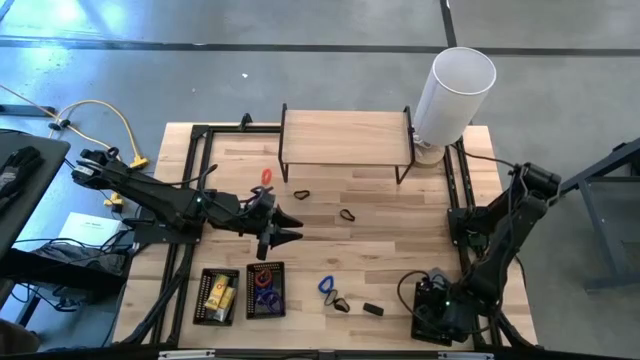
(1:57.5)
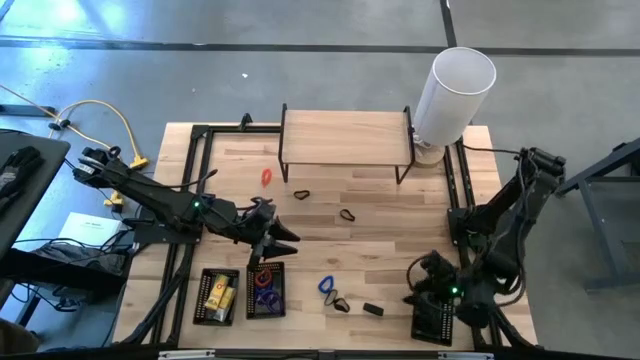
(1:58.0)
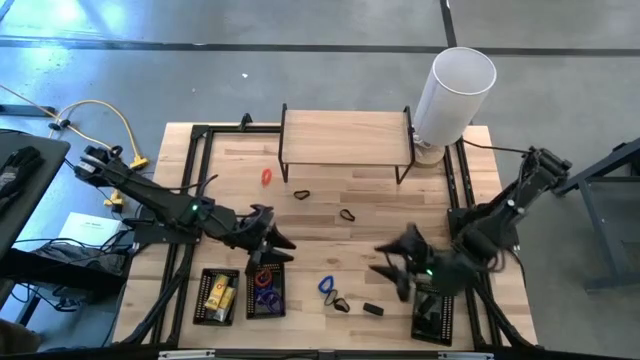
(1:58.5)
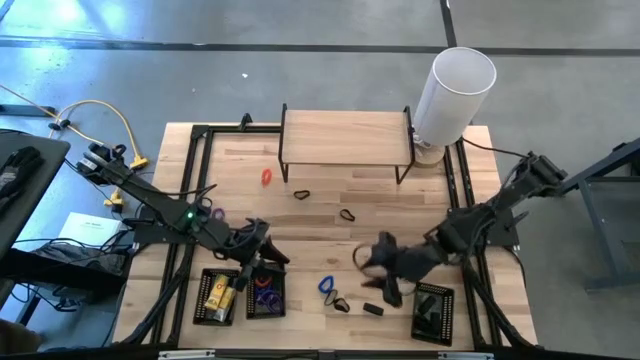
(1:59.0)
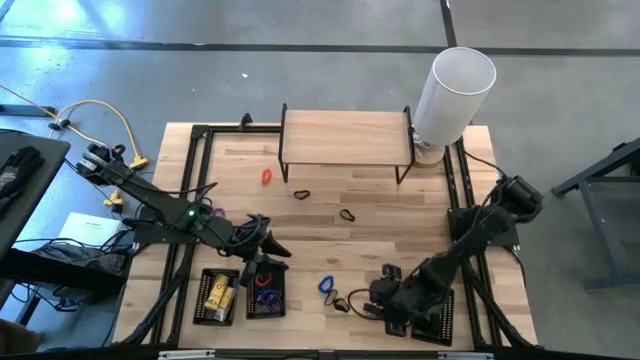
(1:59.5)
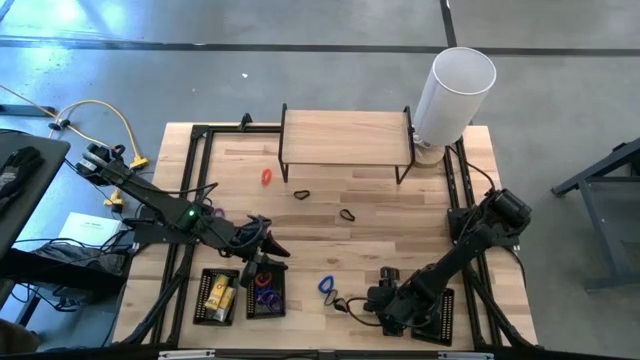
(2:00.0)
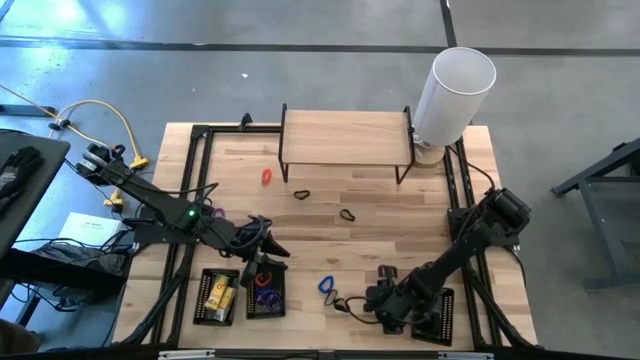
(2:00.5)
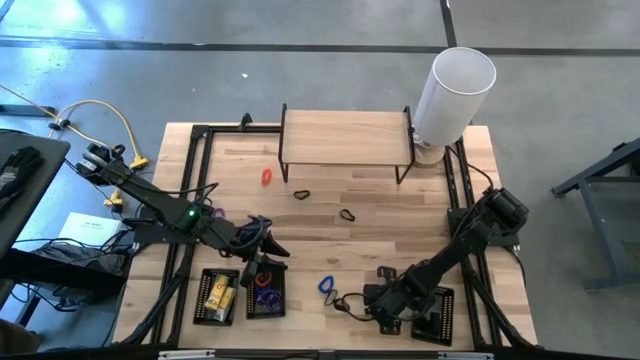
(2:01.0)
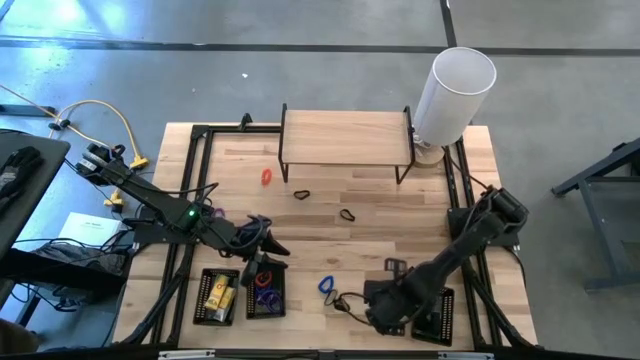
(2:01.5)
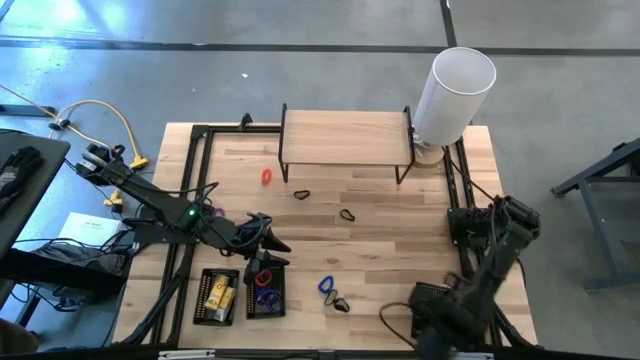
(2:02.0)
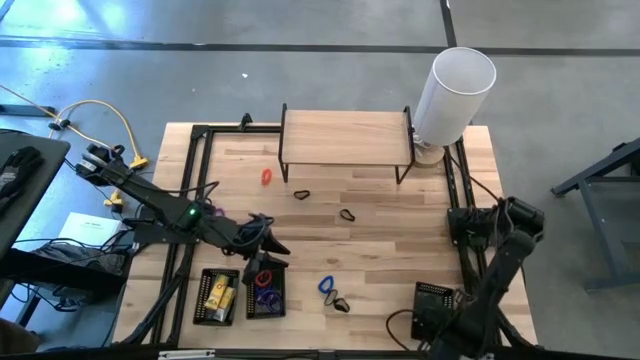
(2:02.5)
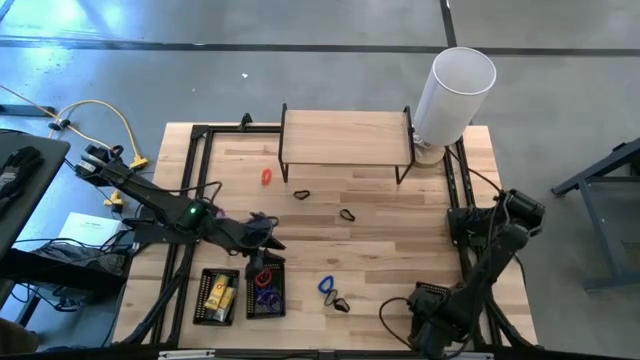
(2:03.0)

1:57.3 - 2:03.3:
Task: Pick & Place Office Desk Supplies
Put the black rubber band into the right black basket

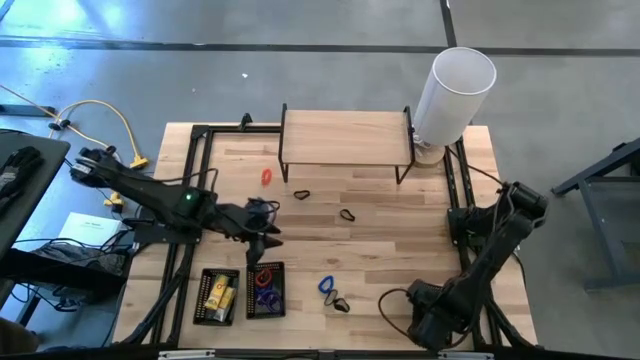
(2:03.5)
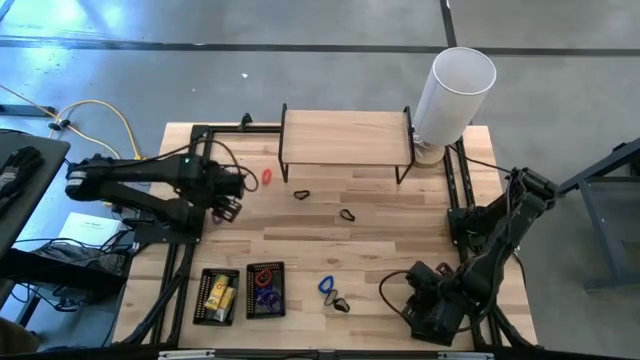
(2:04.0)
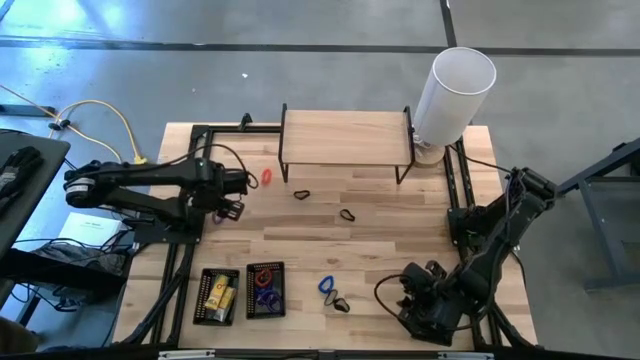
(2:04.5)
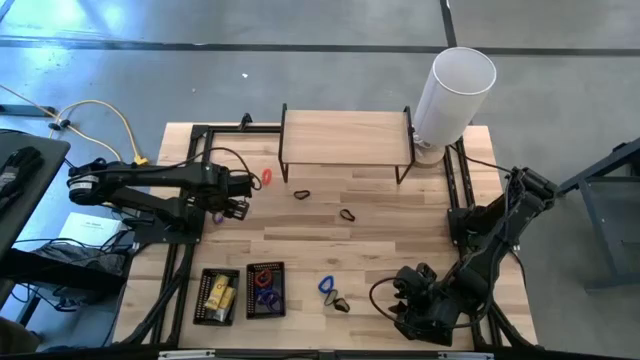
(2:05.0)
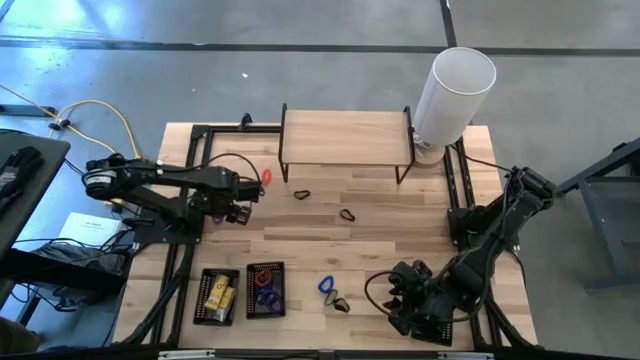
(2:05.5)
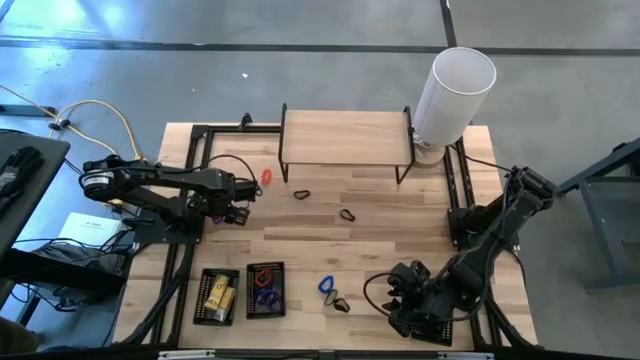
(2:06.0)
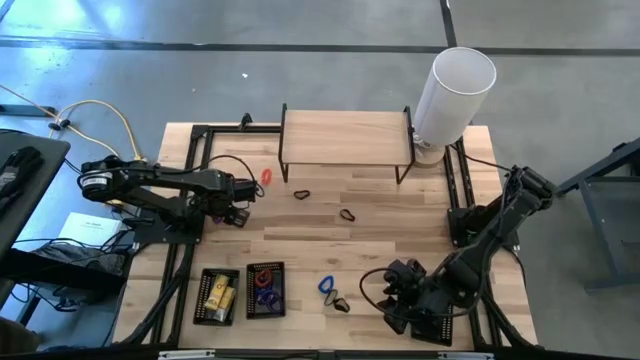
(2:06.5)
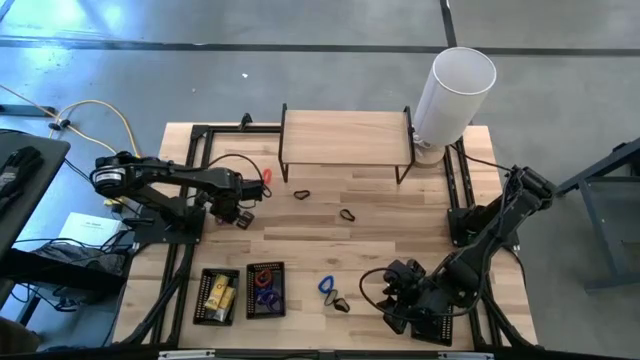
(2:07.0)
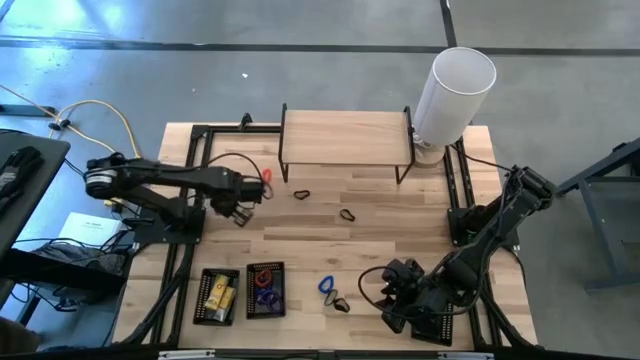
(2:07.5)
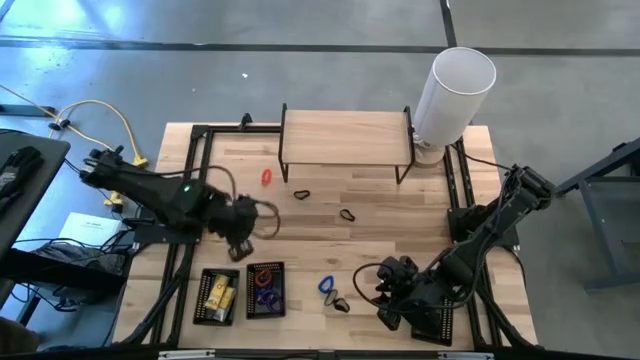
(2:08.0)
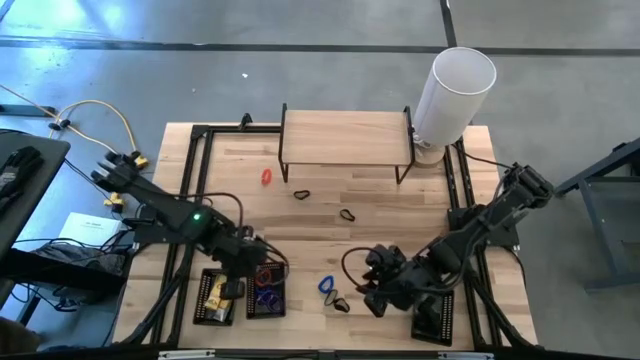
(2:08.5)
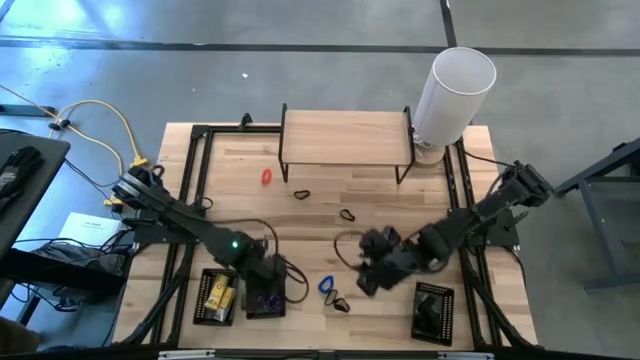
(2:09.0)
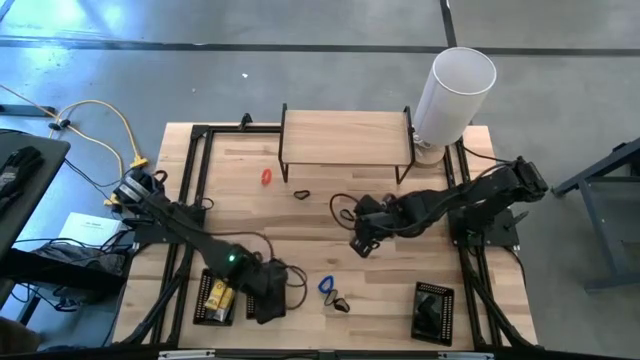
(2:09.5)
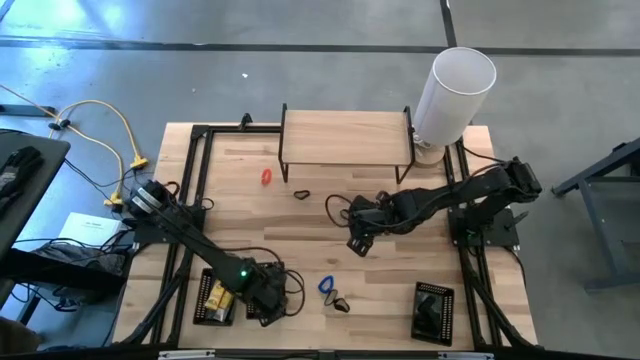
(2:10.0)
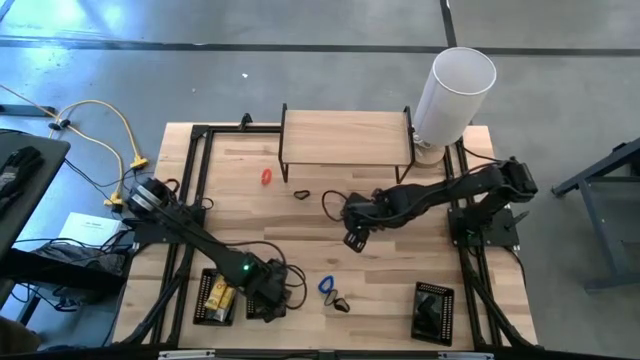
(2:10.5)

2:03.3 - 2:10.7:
Put the violet spring key chain into the middle black basket

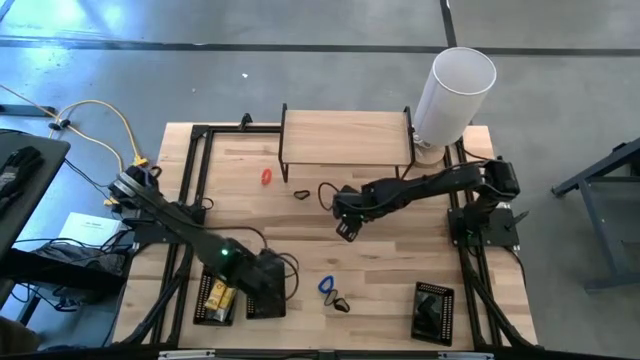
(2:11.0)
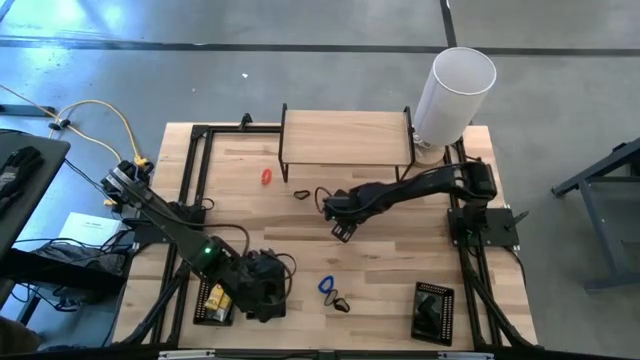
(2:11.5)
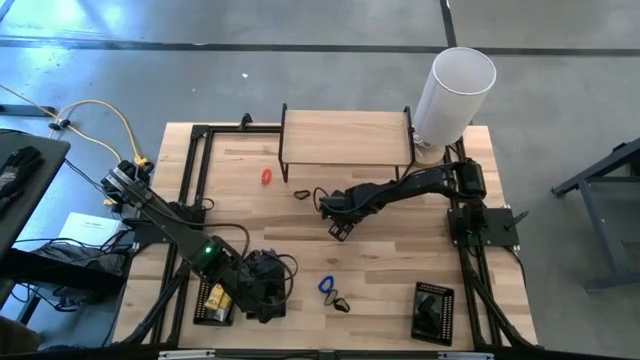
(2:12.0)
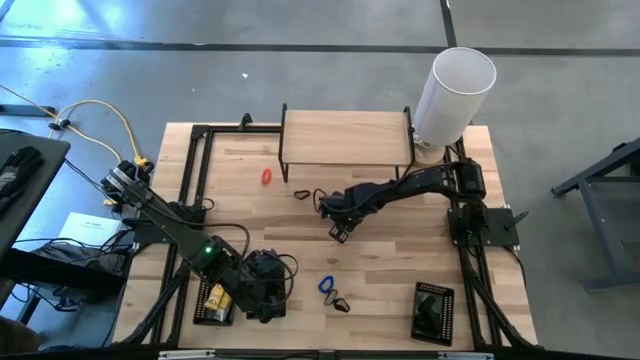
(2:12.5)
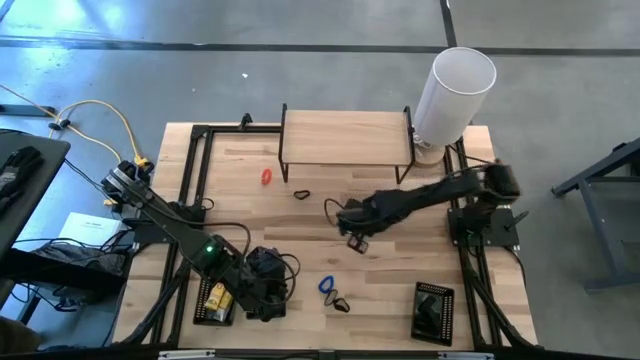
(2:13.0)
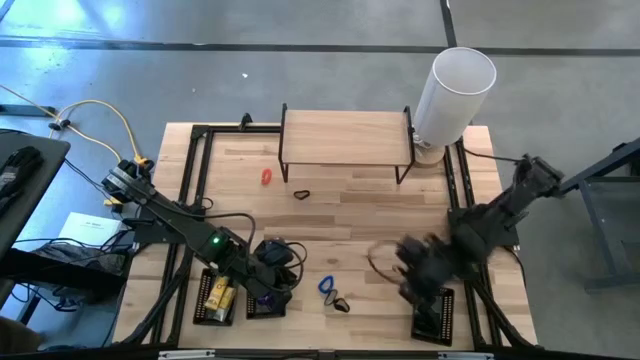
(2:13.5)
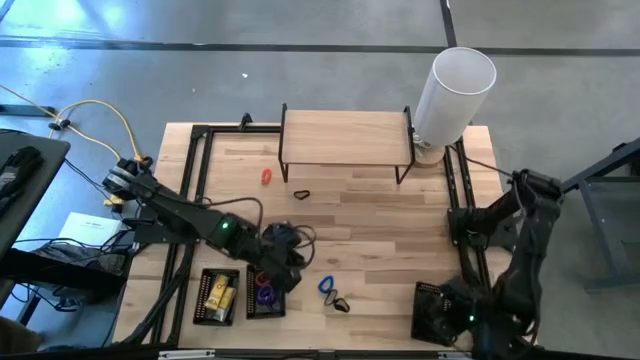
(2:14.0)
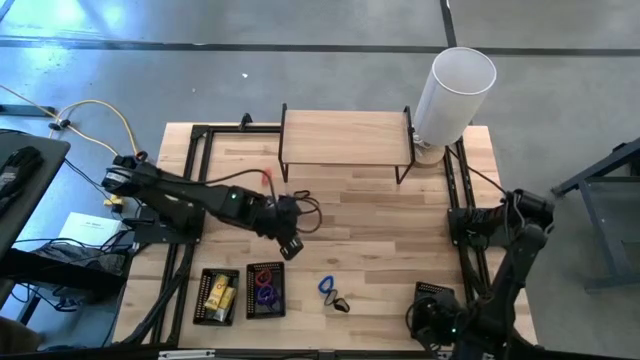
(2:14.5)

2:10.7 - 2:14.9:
Put the black rubber band into the right black basket

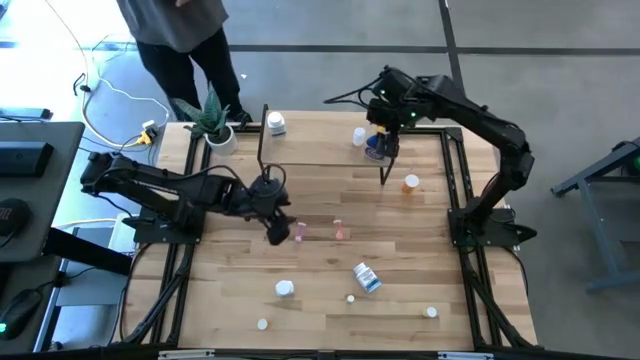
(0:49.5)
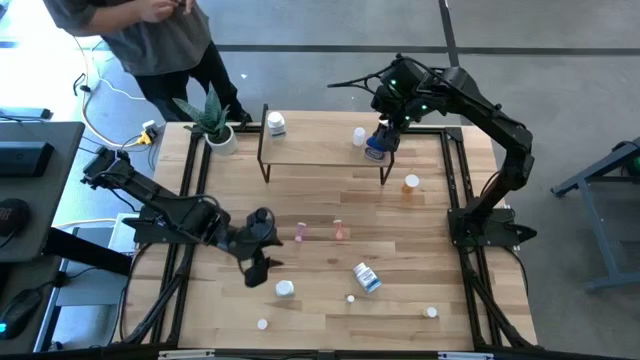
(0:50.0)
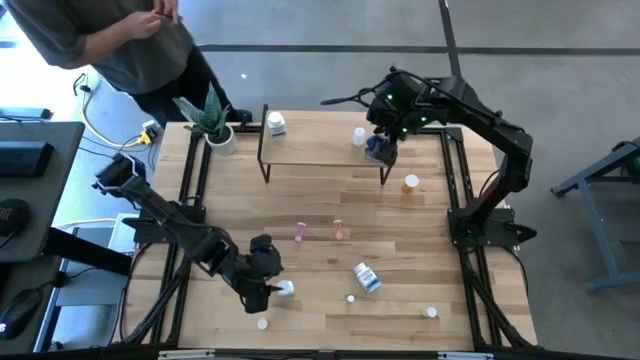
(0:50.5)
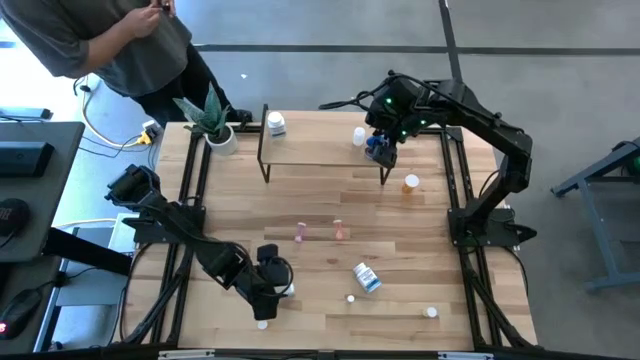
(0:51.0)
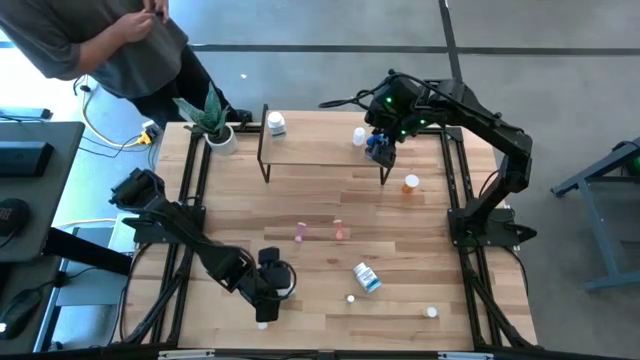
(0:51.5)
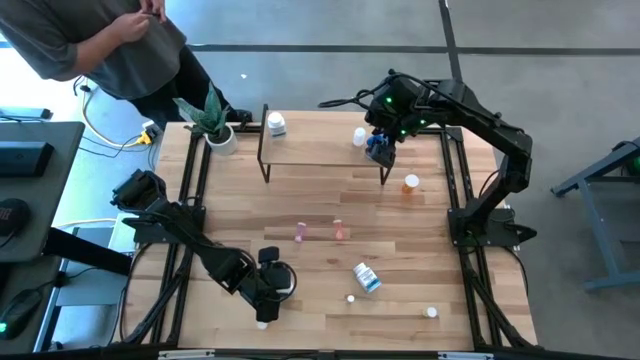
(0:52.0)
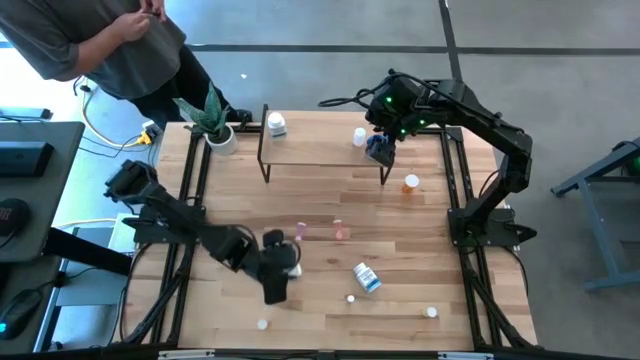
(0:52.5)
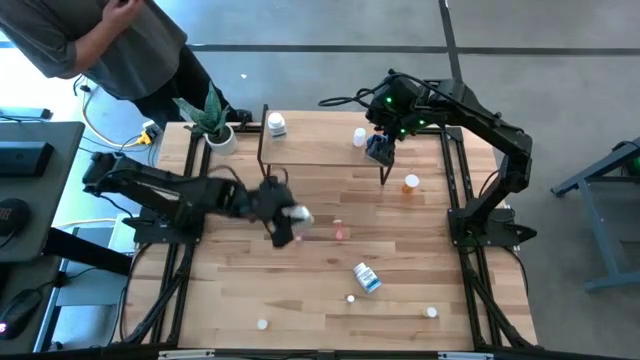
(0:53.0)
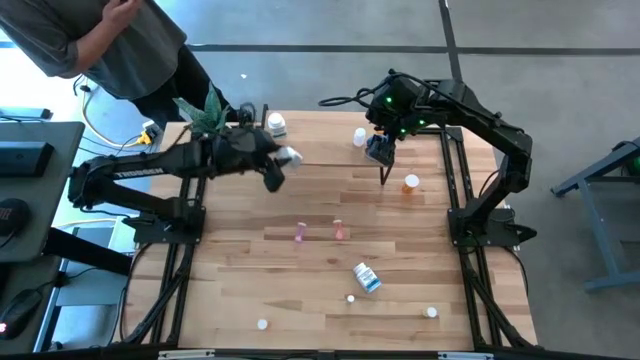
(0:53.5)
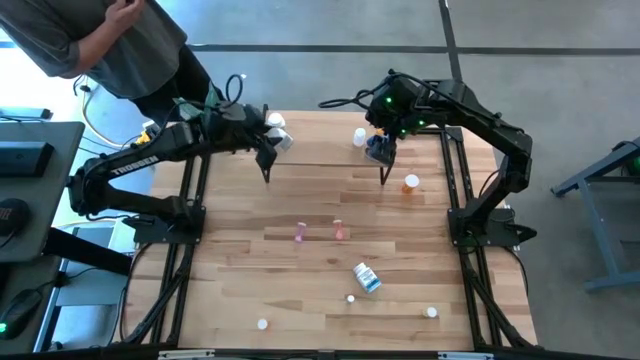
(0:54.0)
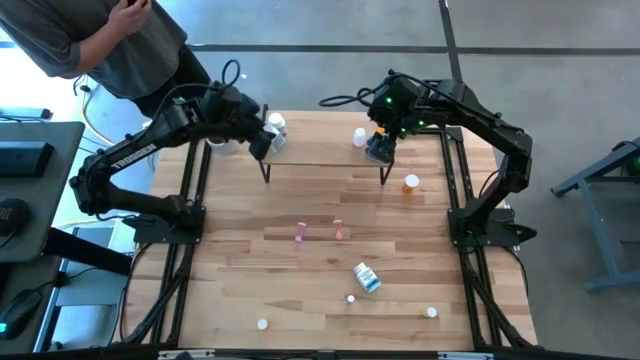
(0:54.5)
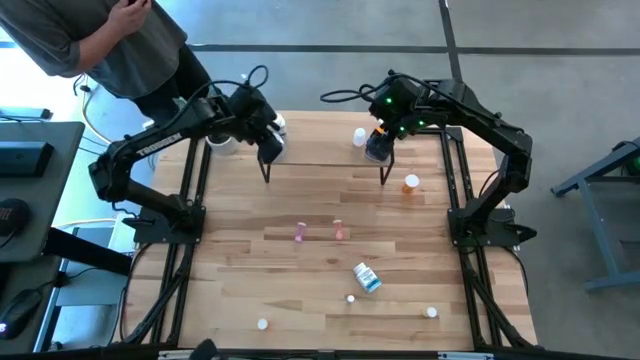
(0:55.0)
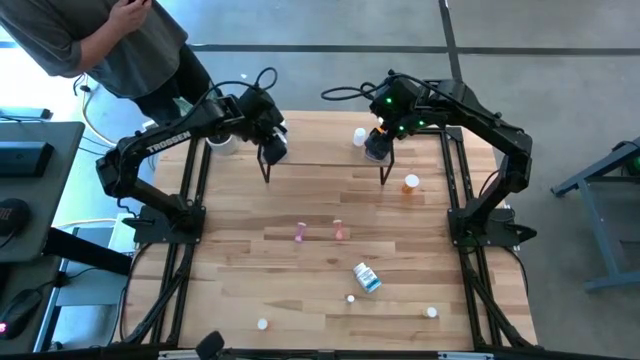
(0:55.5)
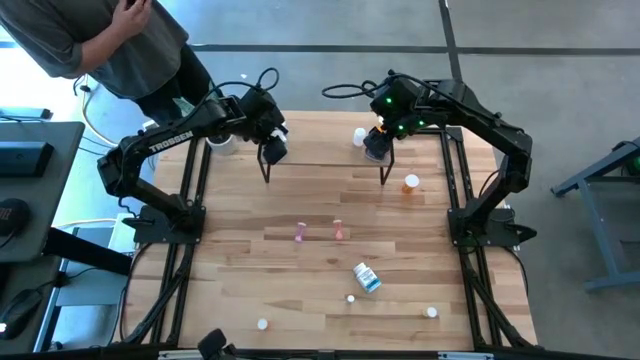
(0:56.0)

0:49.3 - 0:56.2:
Task: Pick and place medicine bottles onto shelf by color
Put the left white pill bottle on the shelf
